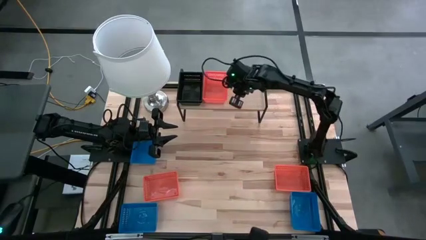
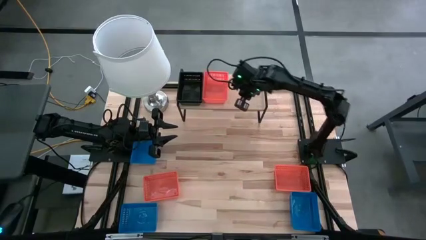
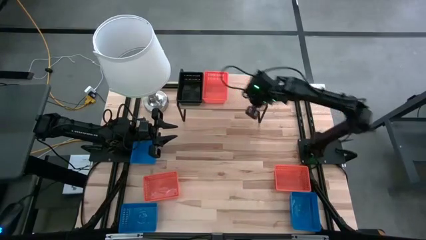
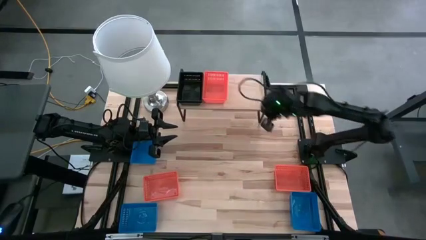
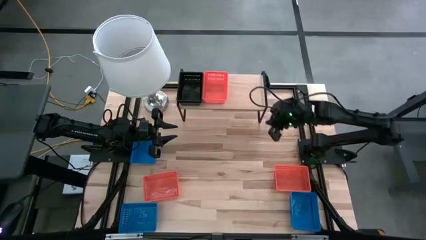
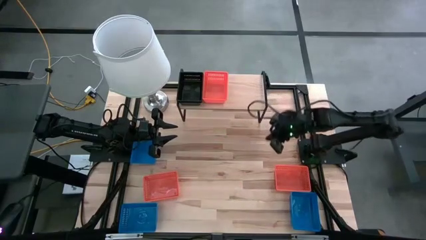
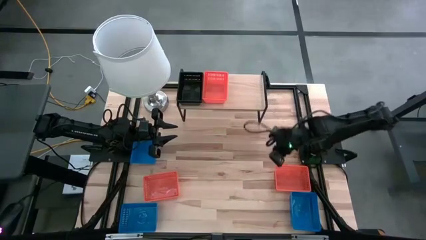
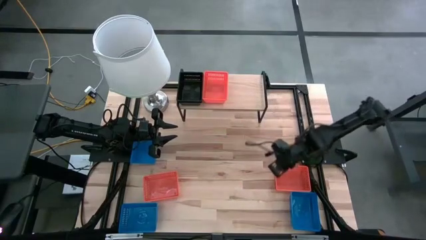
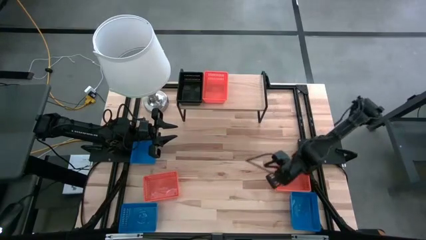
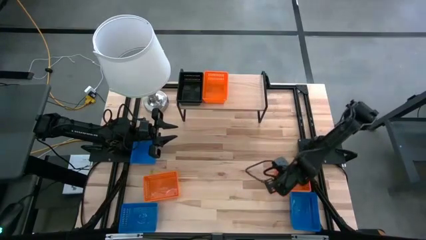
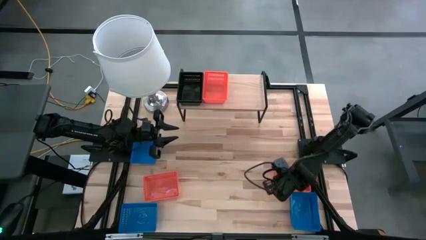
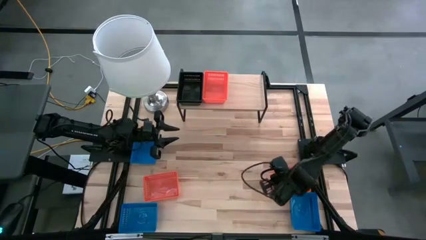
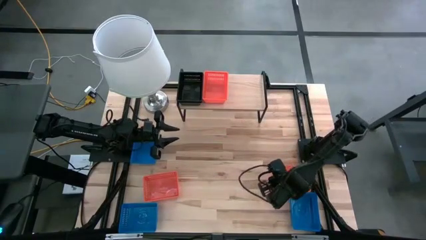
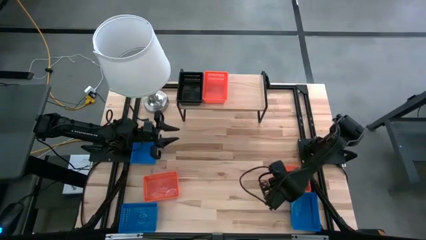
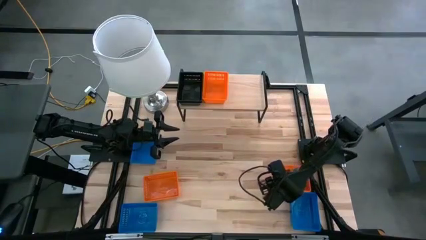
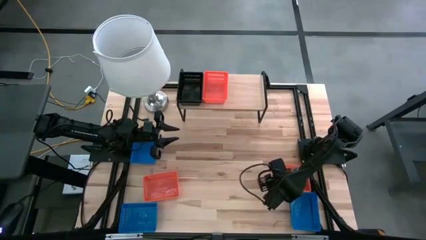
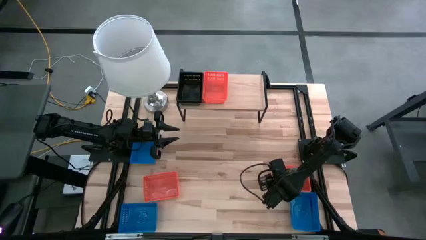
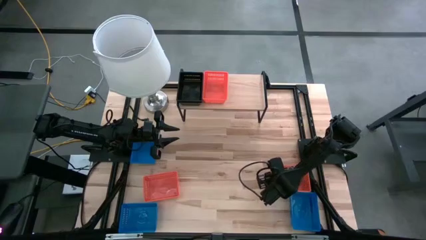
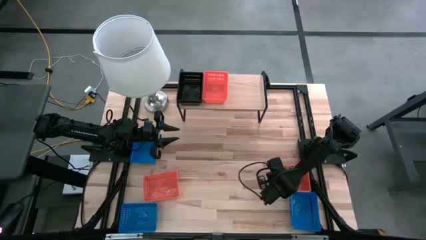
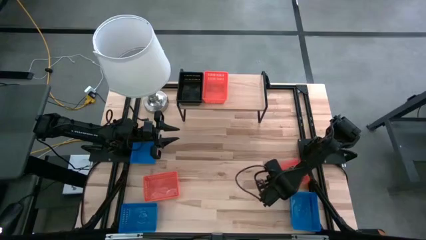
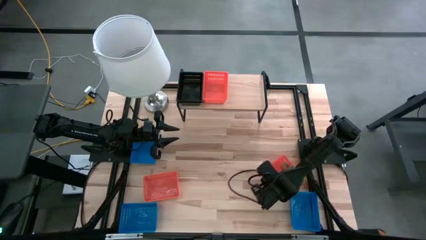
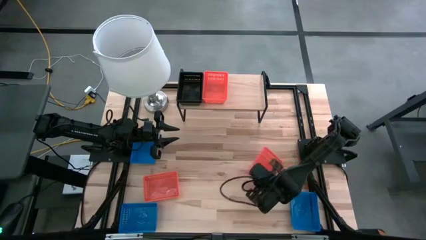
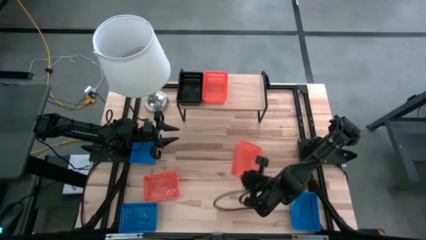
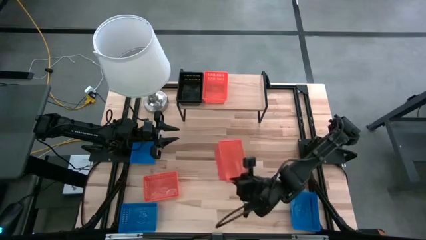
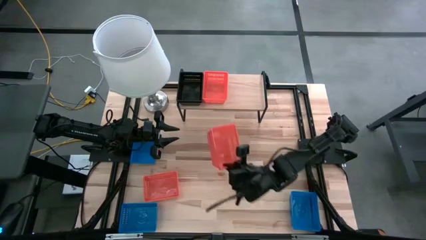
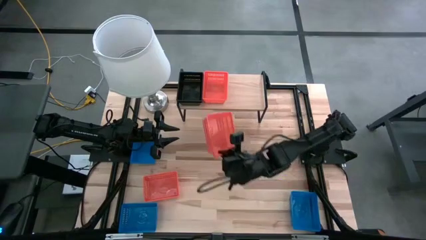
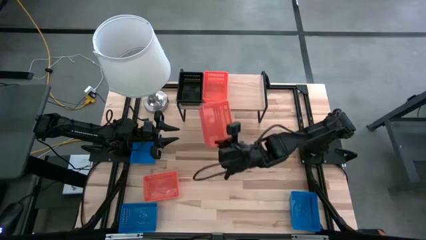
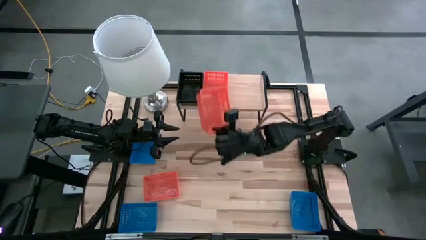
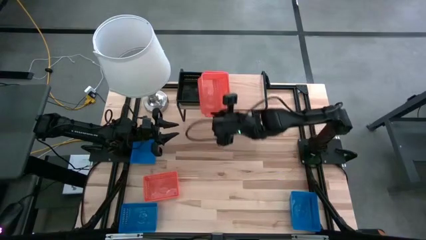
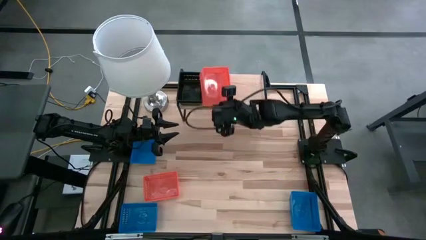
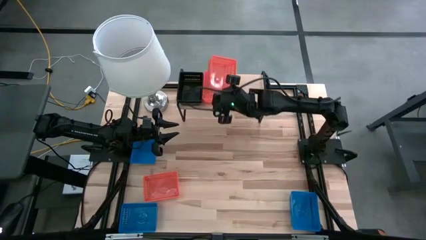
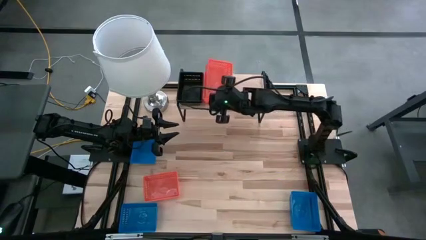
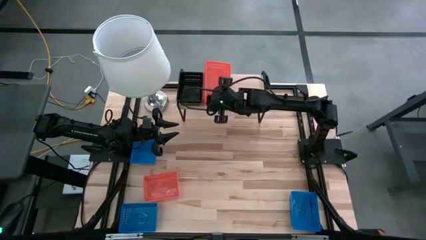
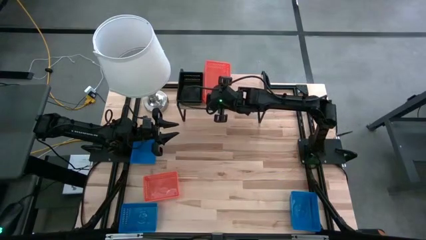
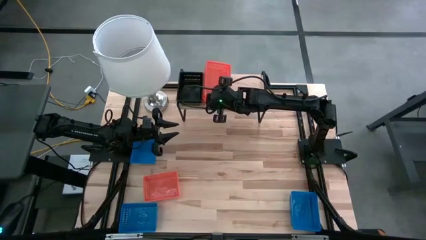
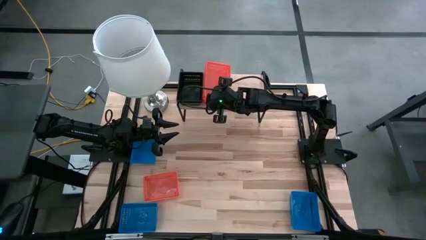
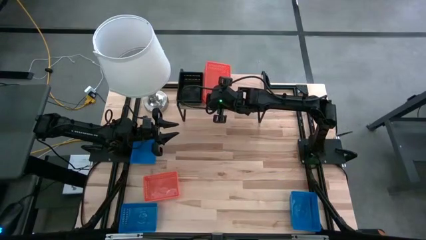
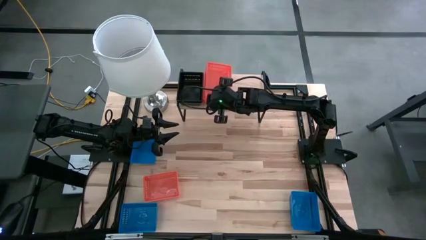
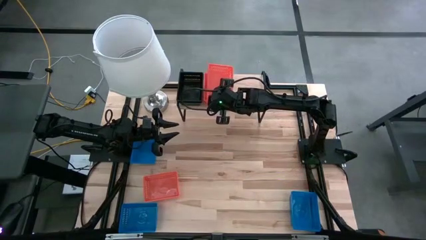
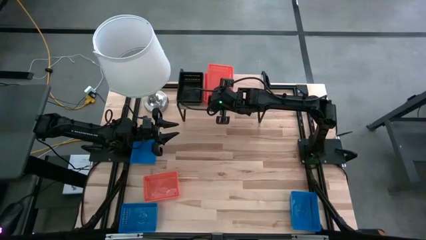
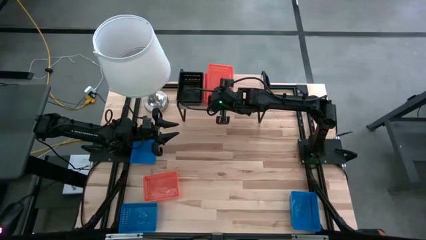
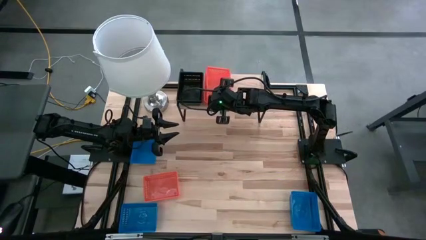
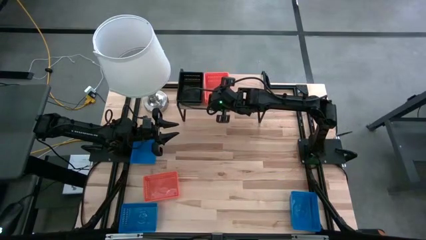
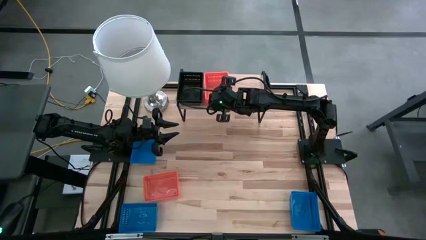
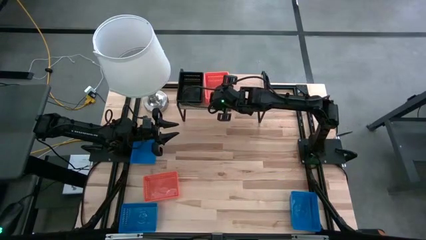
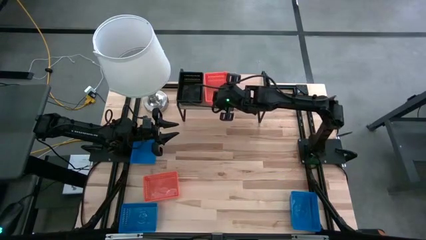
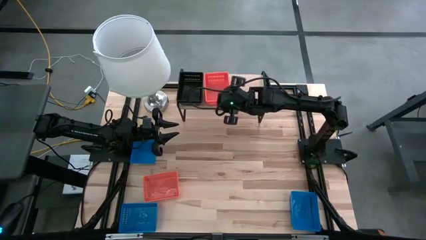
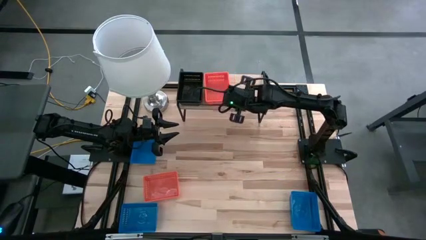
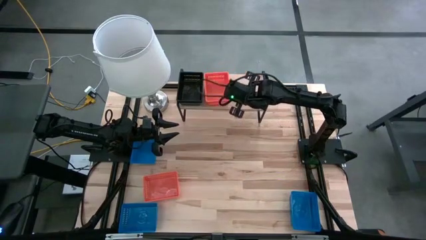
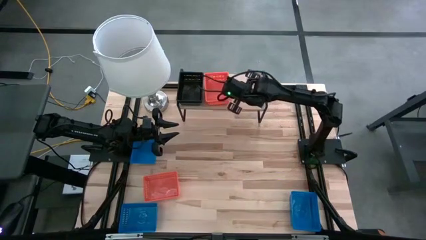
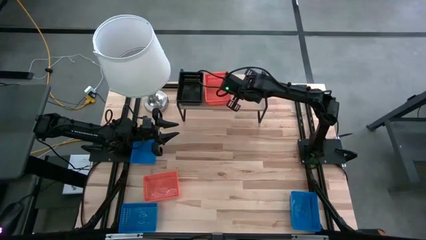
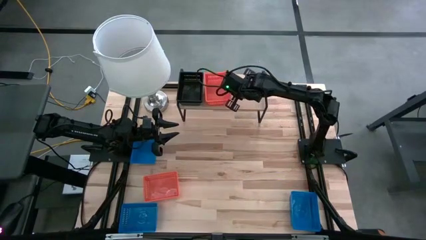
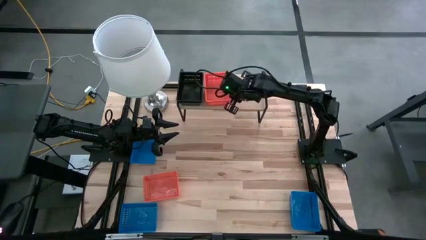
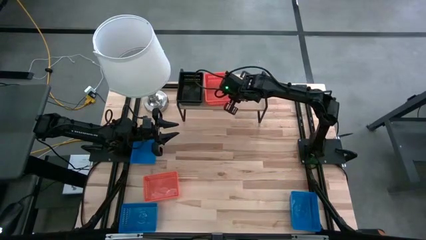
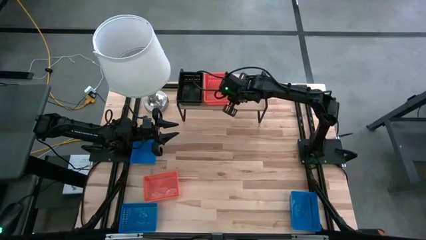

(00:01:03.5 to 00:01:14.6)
Task: Stack baskets on shelf by color
Stack the right orange bin on top of the orange bin on the shelf

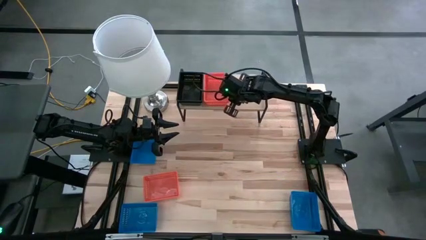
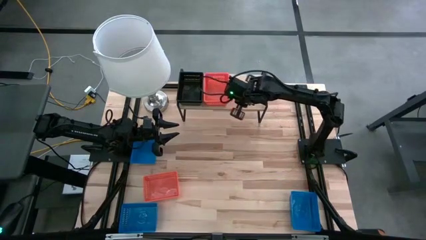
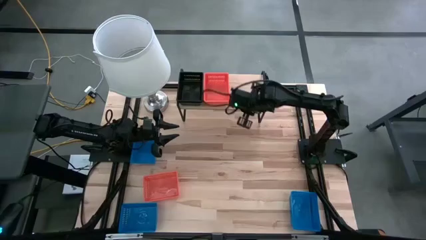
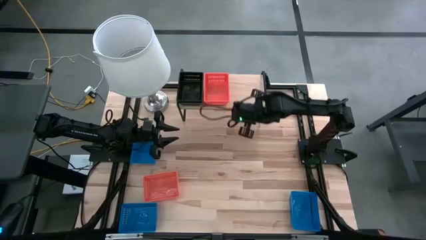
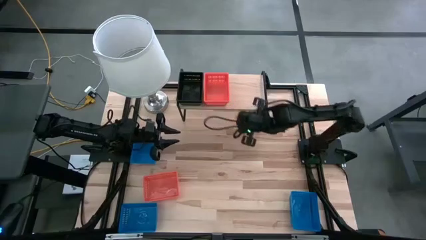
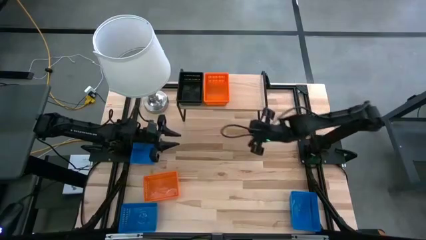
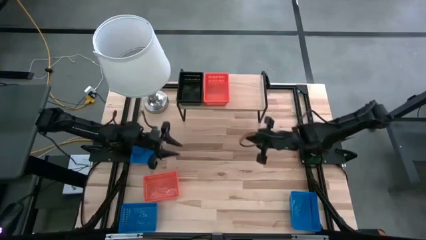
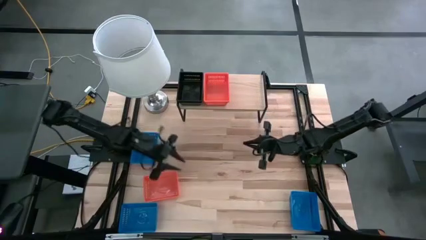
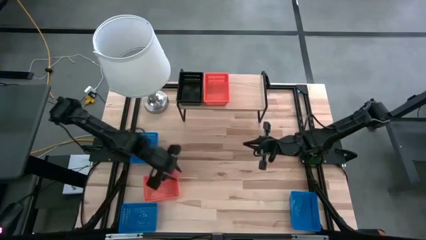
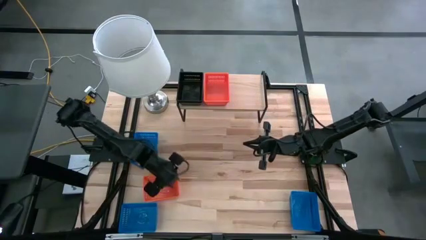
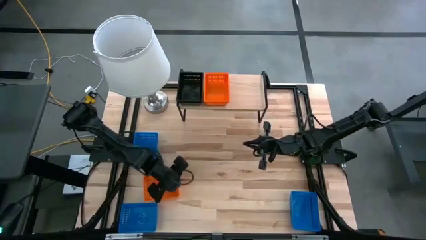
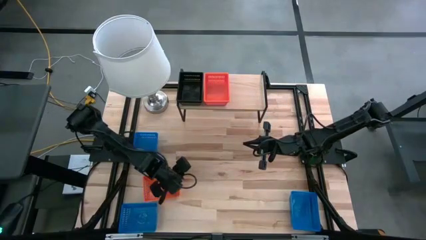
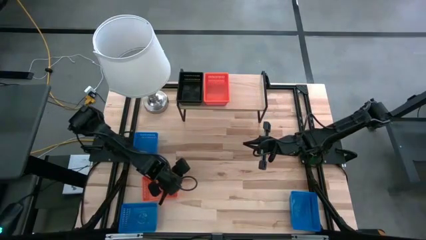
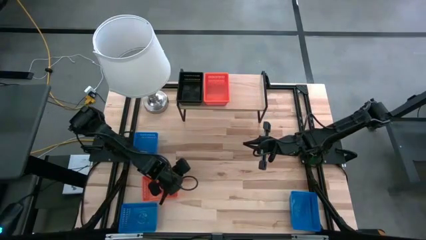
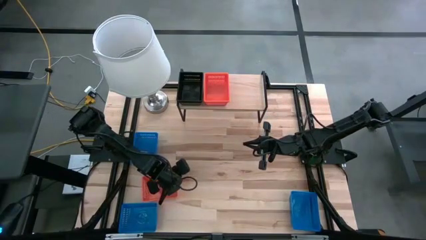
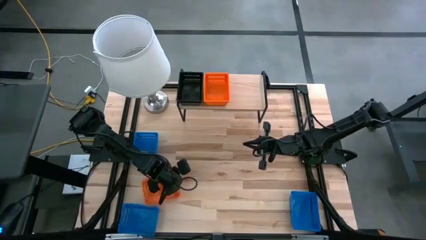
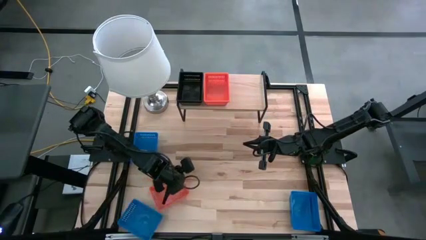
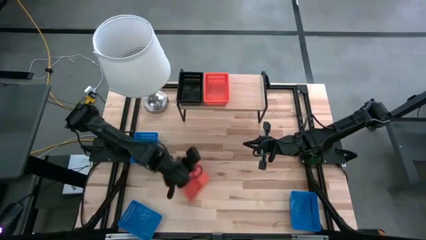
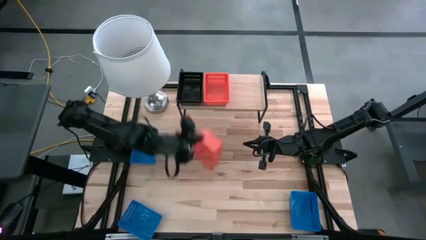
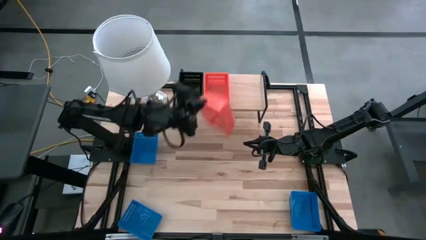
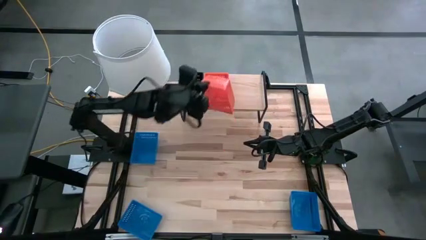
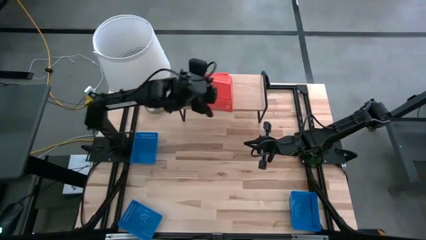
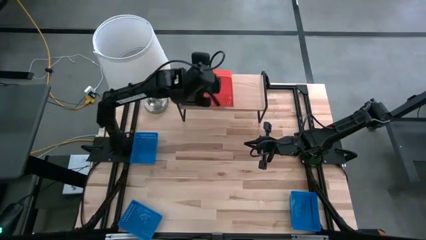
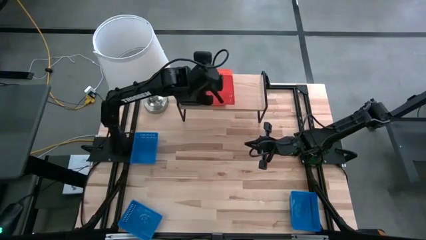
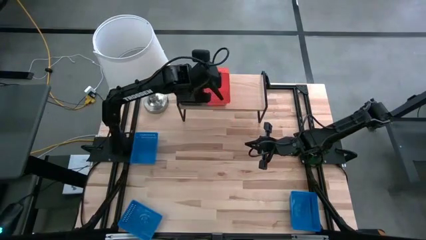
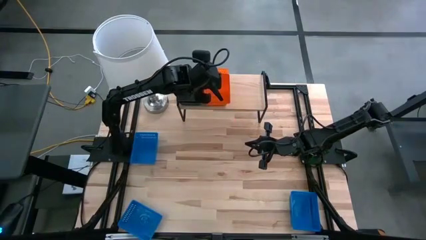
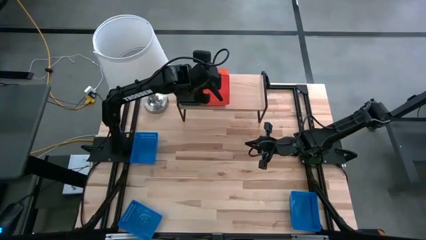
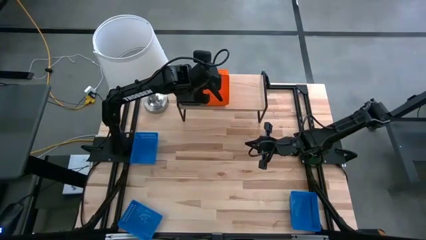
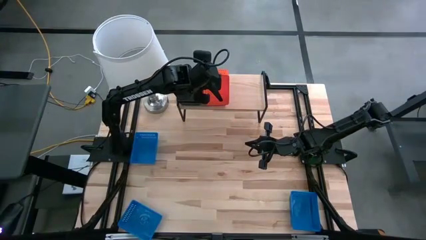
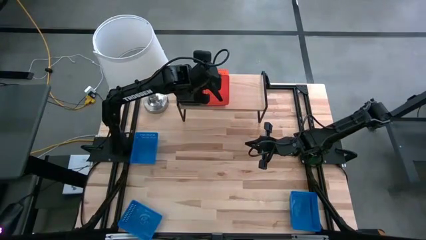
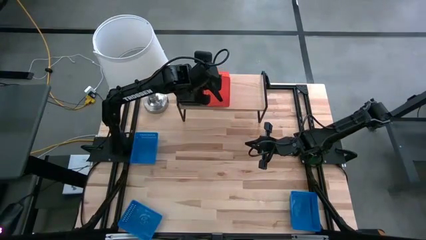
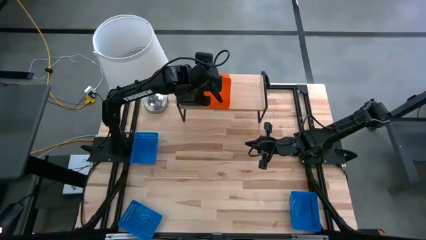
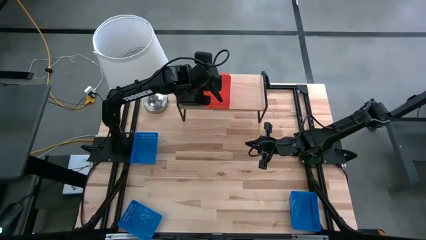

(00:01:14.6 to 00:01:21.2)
Stack the orange bin on top of the orange bin on the shelf
